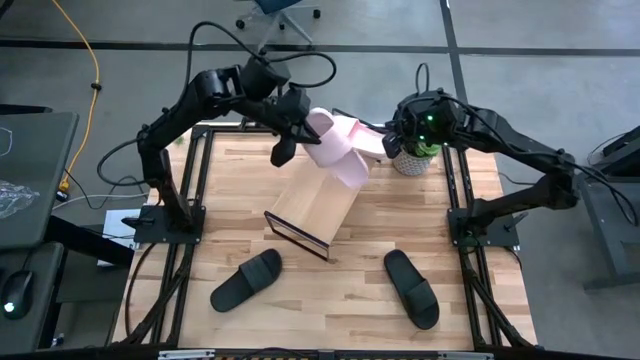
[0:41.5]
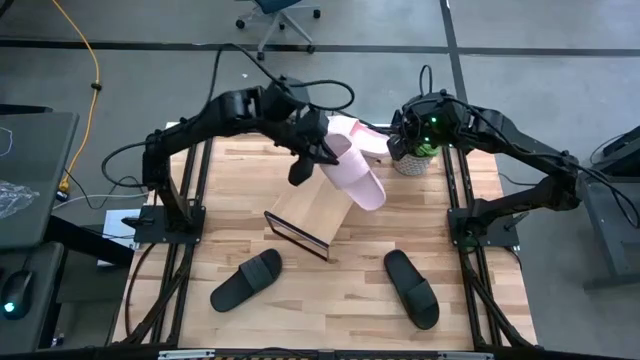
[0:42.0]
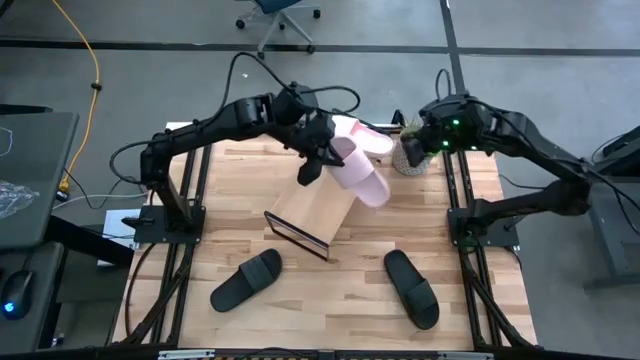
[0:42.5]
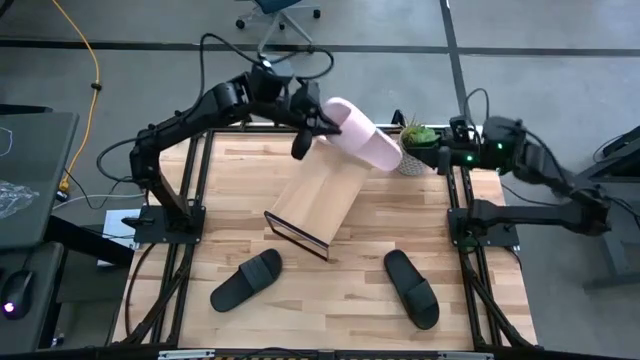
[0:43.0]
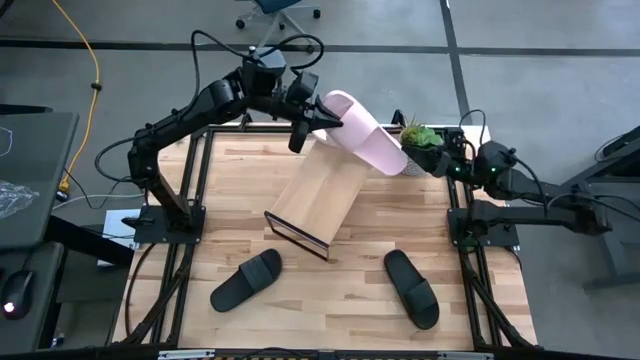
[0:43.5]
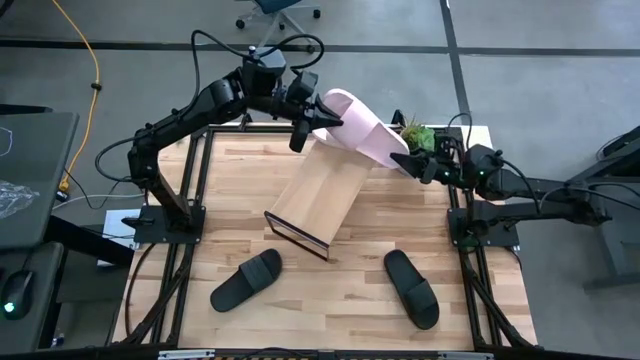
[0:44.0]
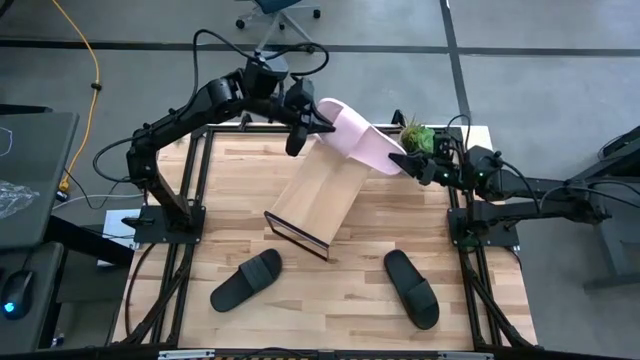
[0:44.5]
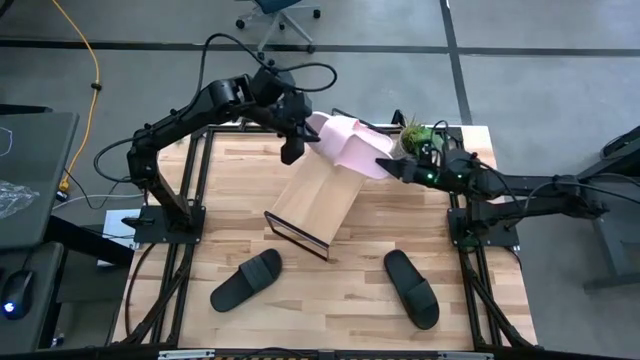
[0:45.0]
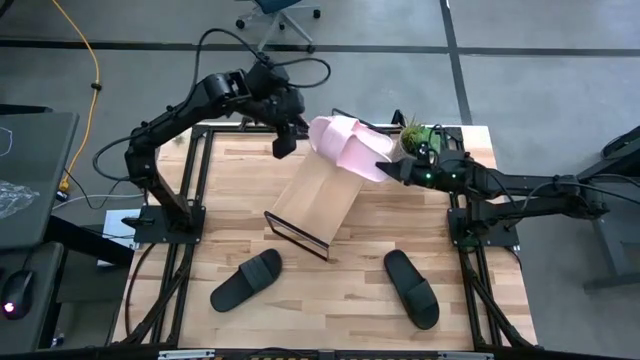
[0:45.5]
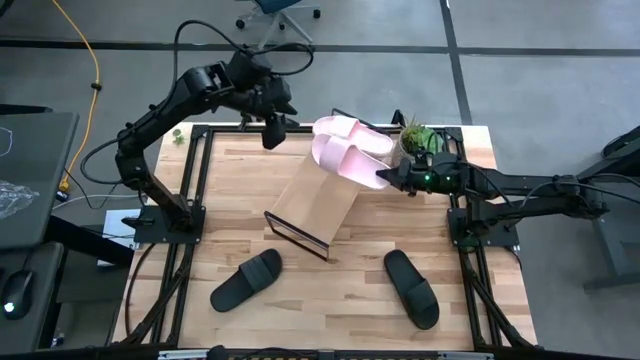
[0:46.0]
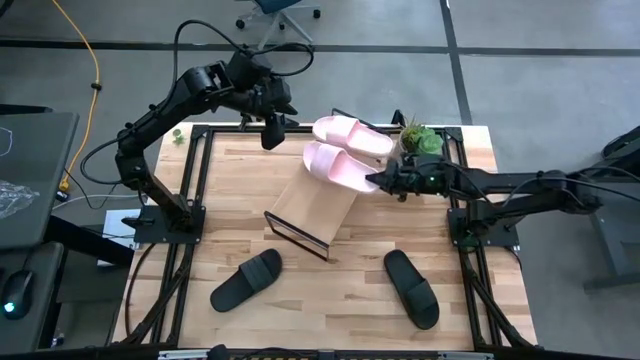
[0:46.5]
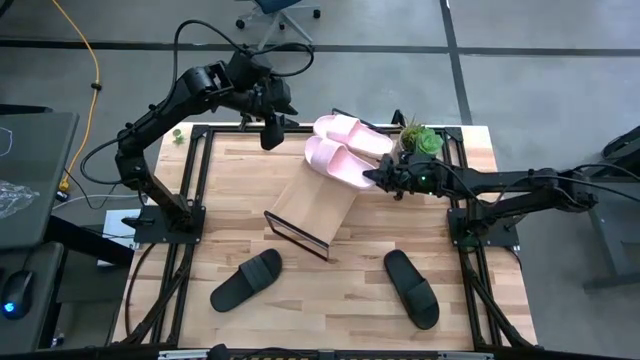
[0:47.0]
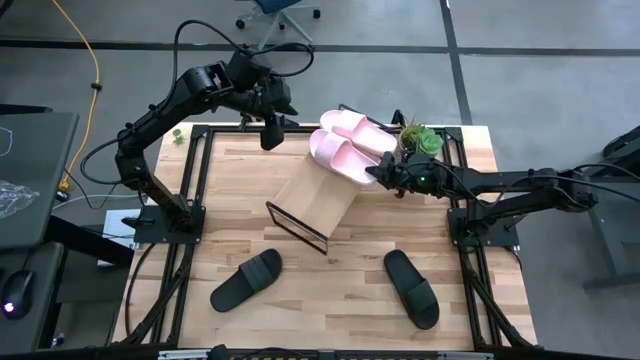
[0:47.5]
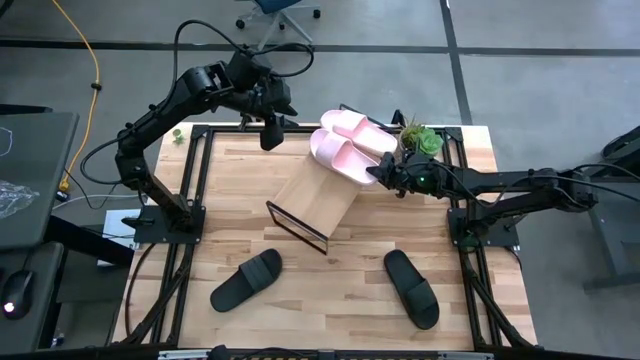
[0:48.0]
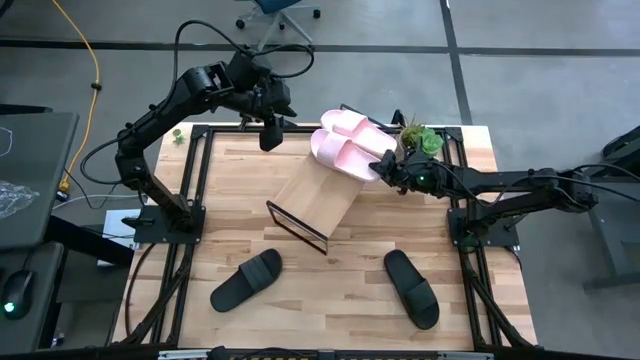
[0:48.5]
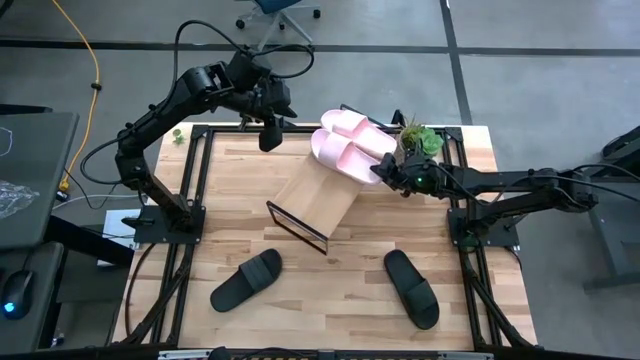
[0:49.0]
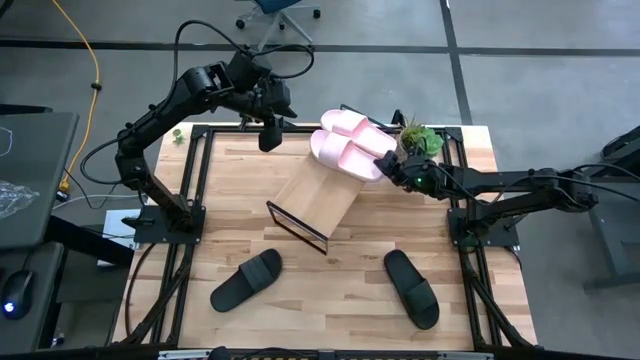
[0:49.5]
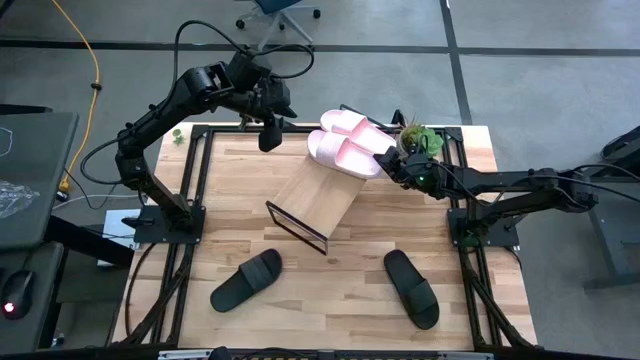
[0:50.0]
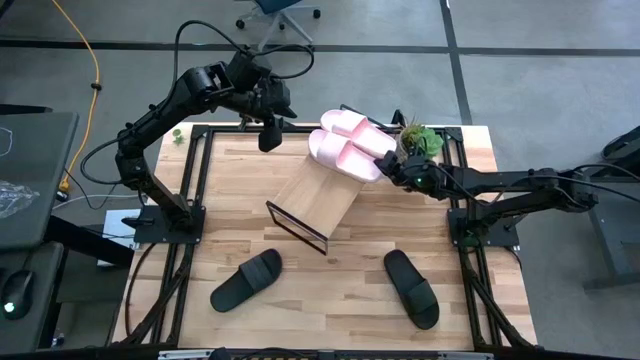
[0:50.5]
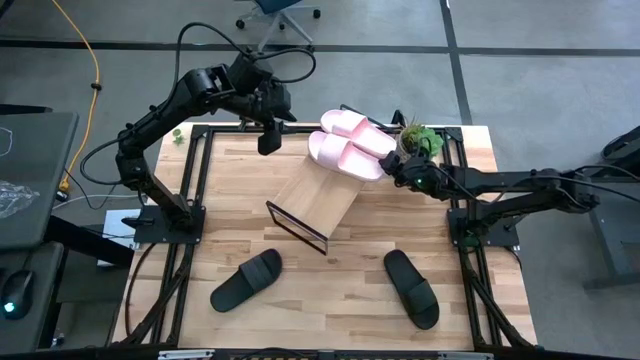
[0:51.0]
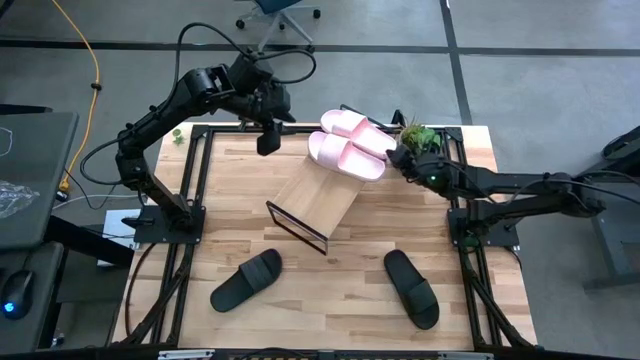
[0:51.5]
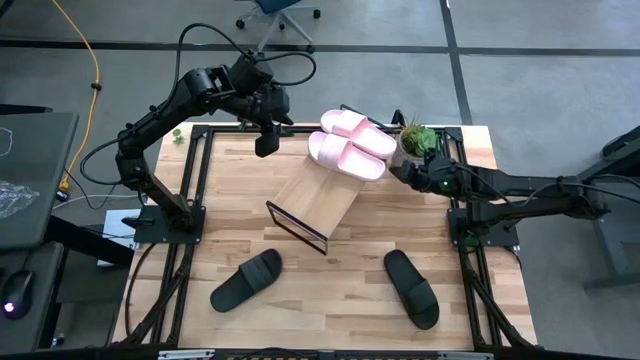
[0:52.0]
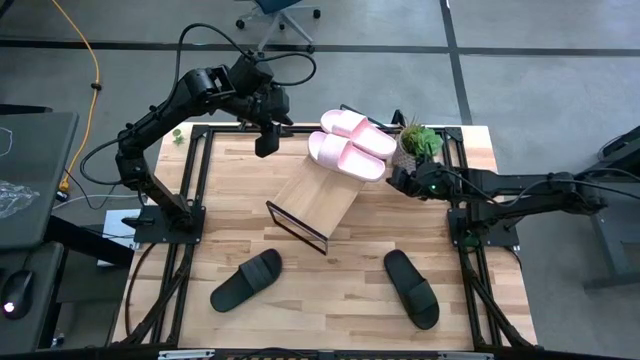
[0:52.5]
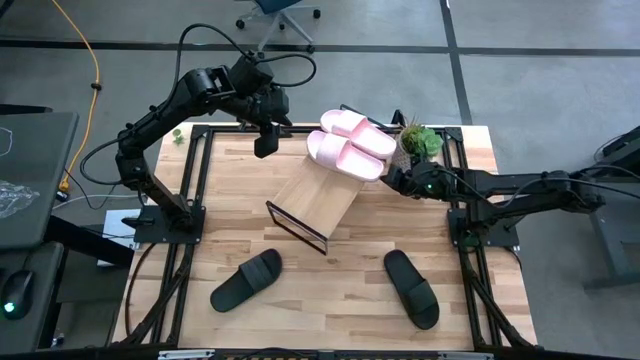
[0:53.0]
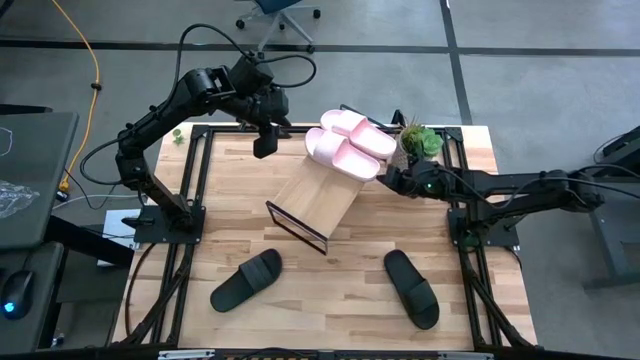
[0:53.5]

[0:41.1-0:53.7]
Task: Pick and place slides into the shelf
Put the pink slide on the shelf

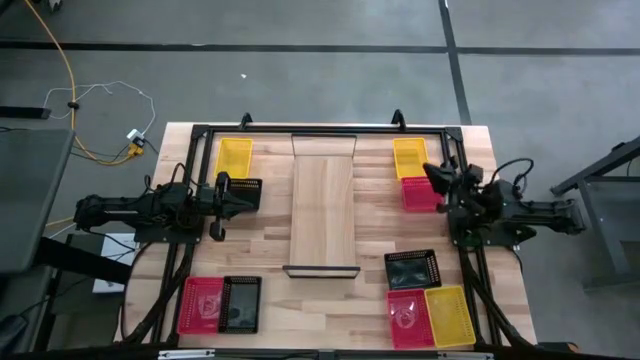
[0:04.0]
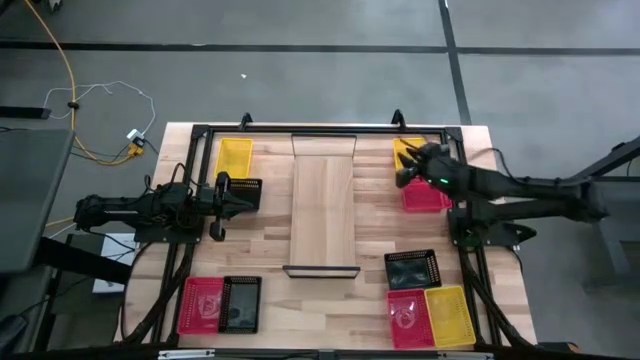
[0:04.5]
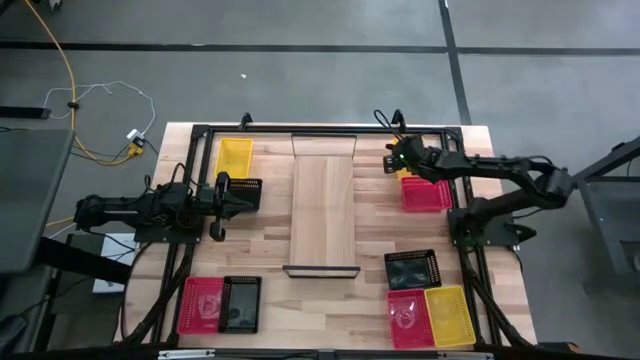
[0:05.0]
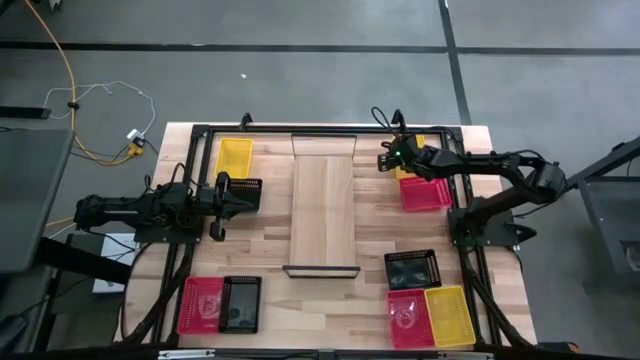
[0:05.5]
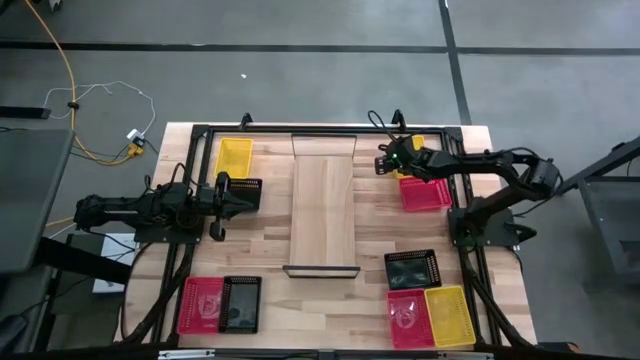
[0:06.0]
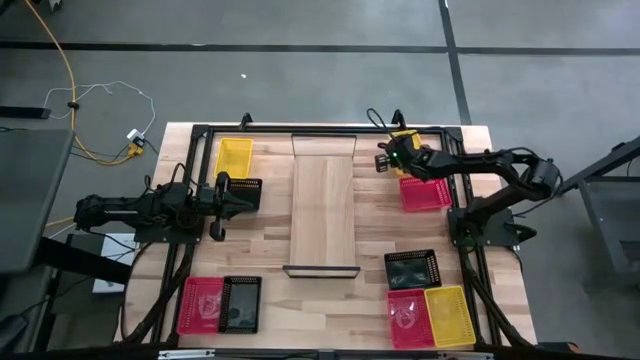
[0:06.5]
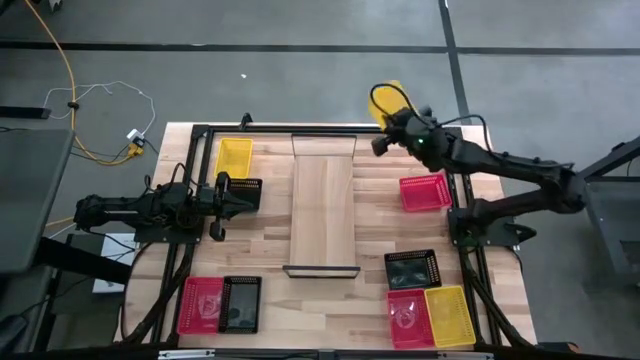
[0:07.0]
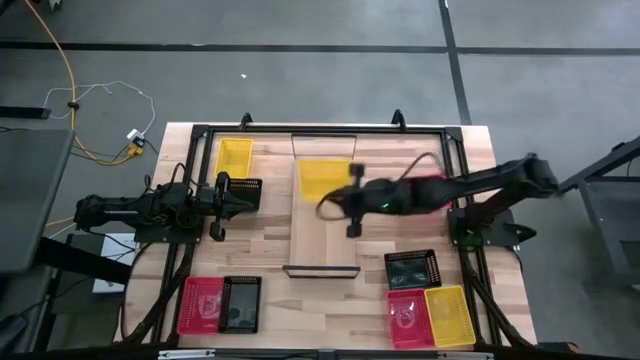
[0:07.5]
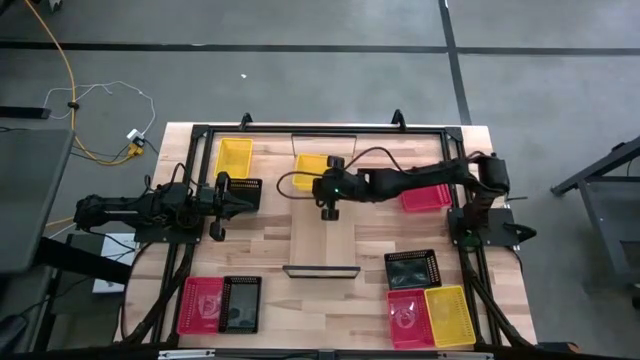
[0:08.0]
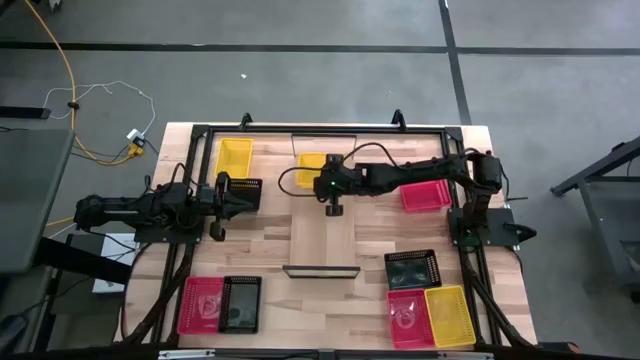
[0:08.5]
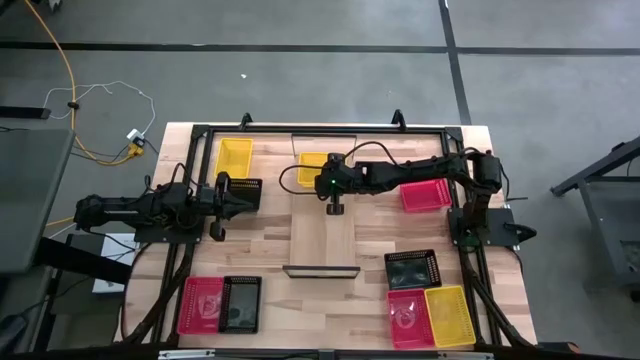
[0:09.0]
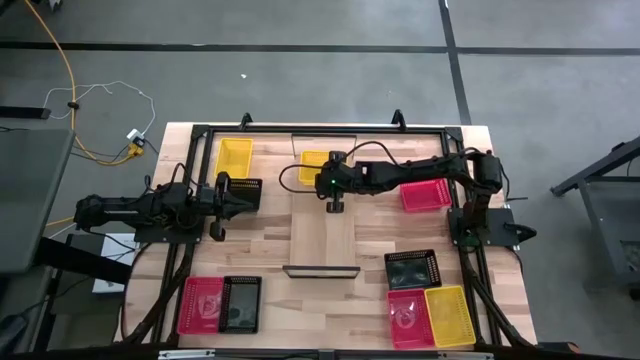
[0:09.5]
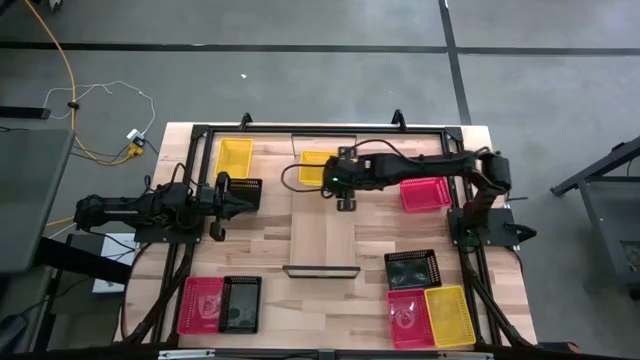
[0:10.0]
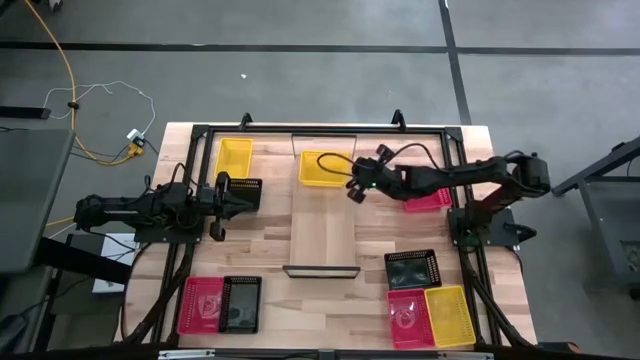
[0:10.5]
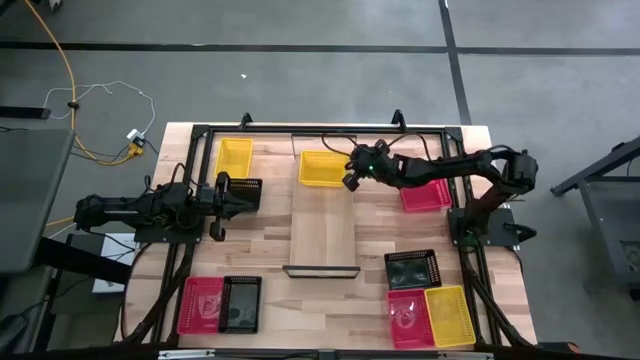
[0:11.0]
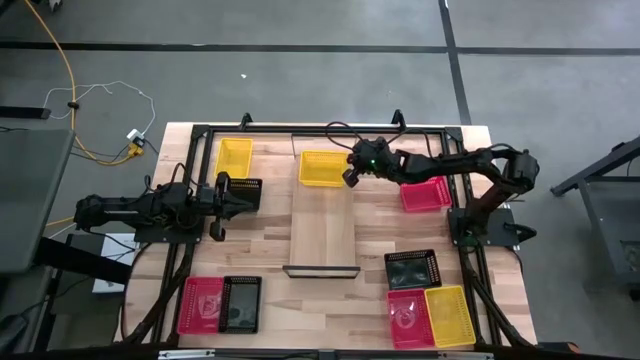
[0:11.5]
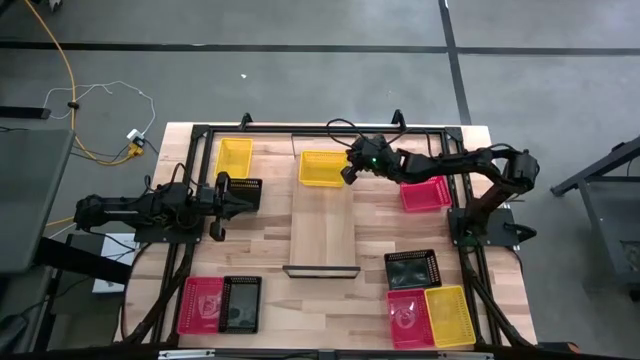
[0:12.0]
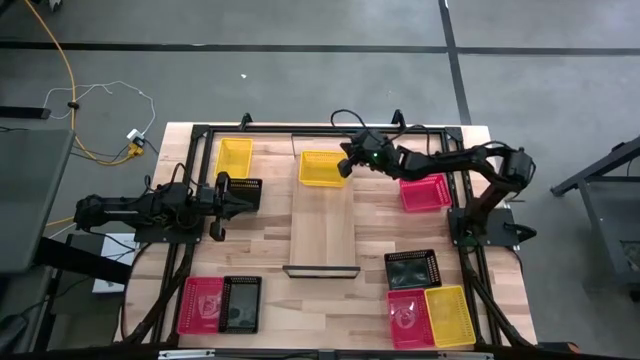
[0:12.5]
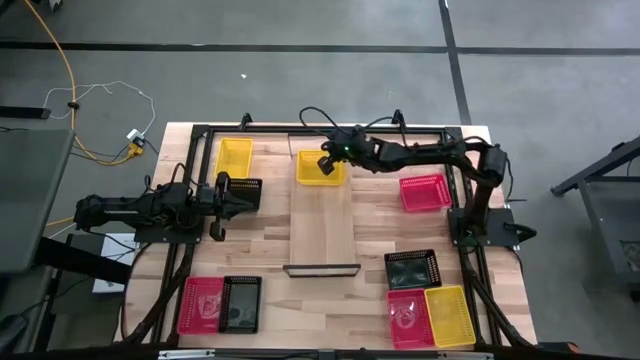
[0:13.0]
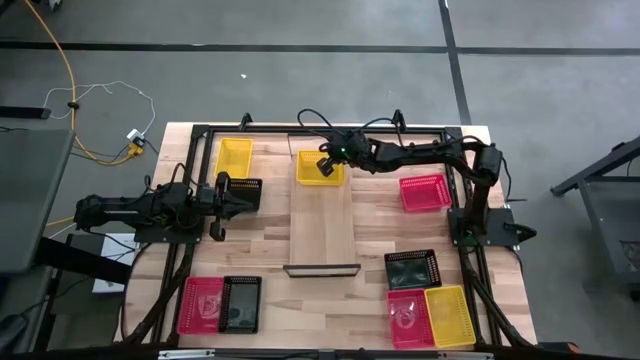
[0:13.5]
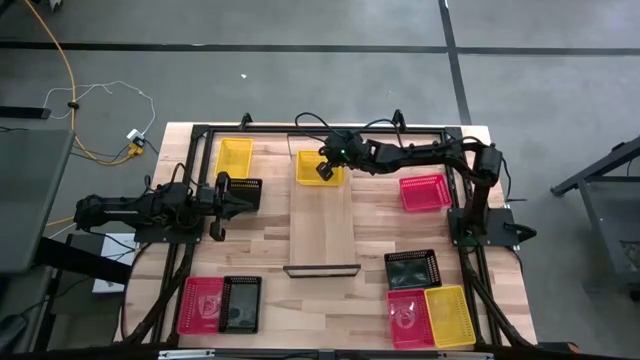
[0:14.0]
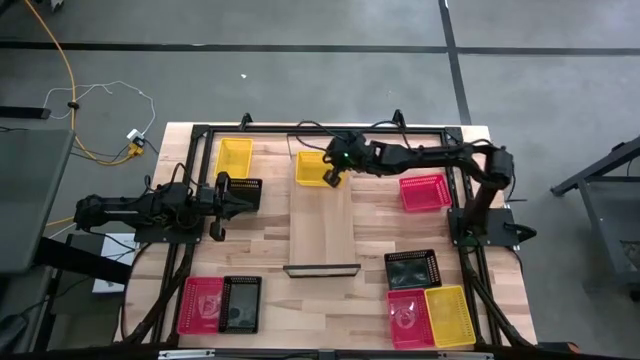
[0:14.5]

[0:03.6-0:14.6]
Task: Stack baskets on shelf by color
Put the top right yellow bin on the shelf
